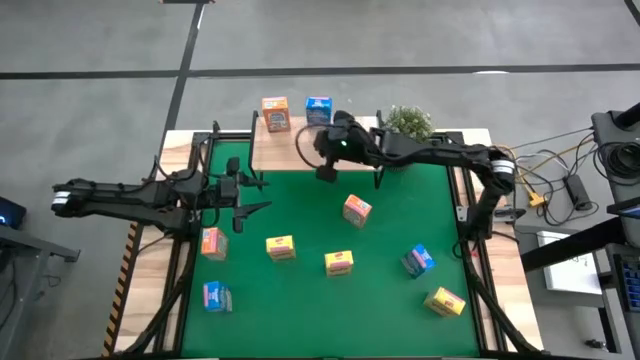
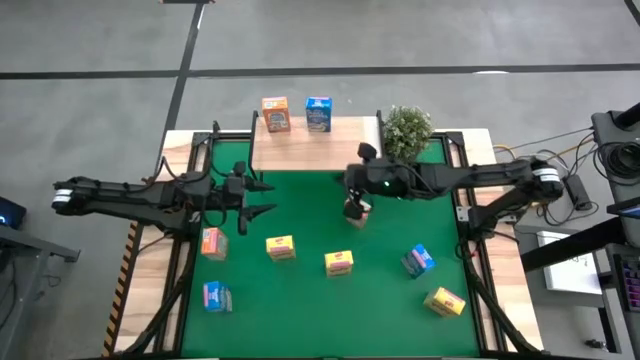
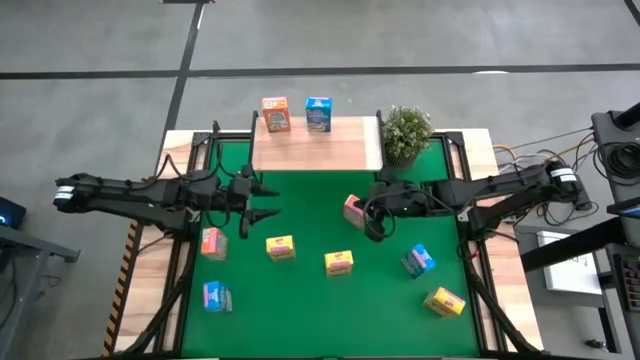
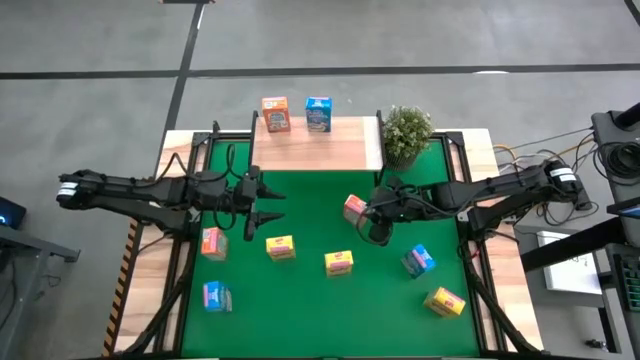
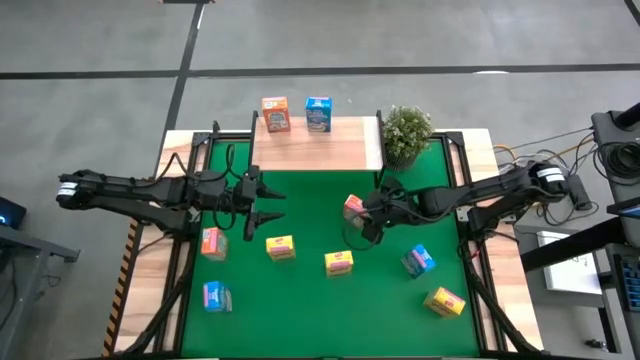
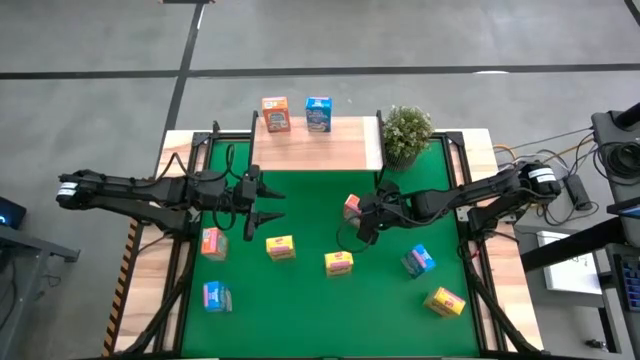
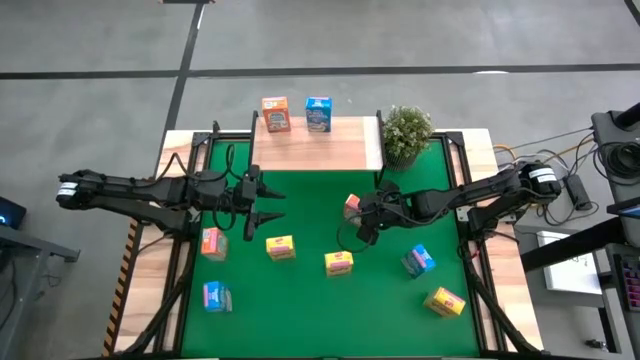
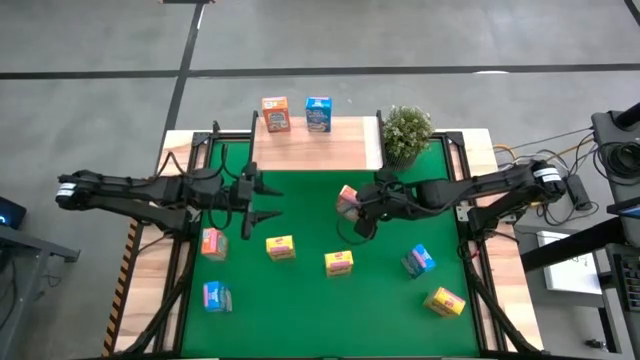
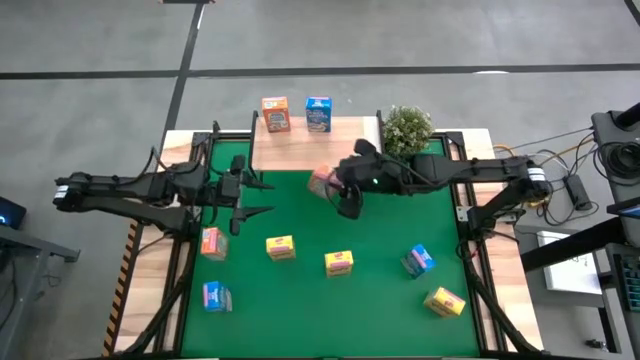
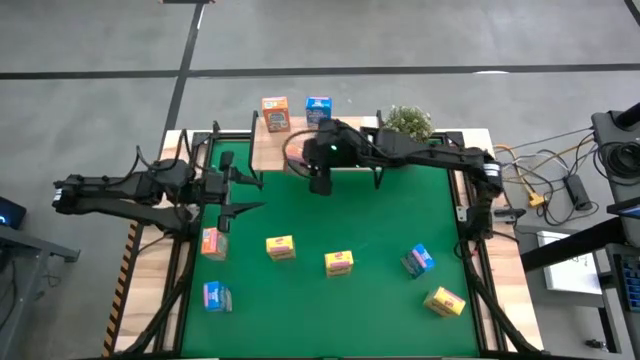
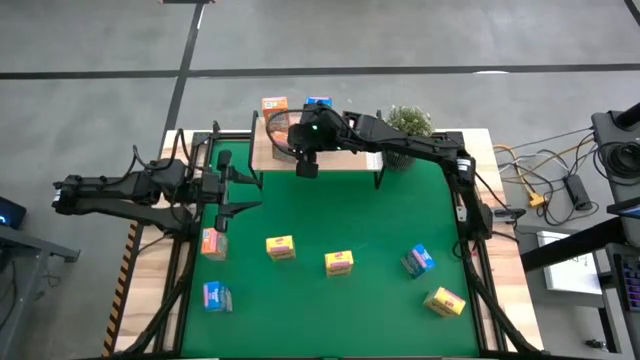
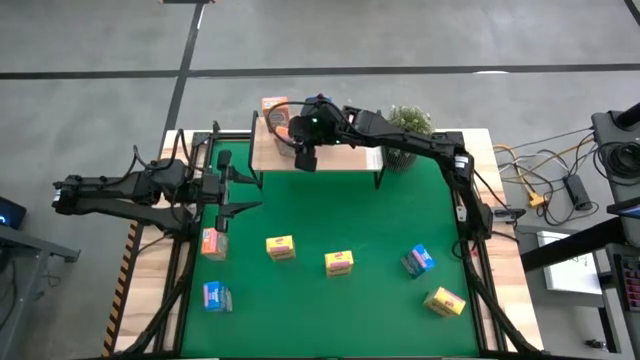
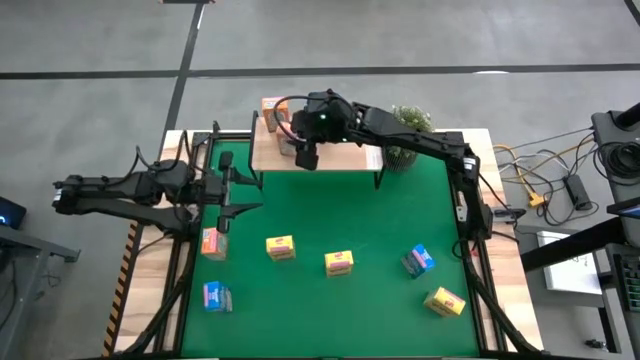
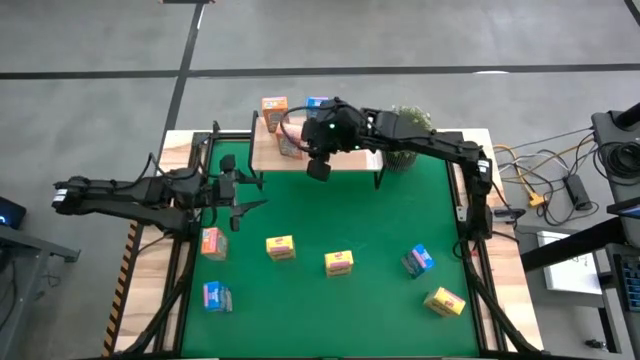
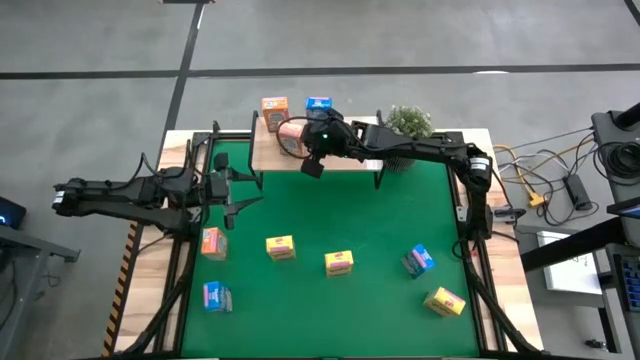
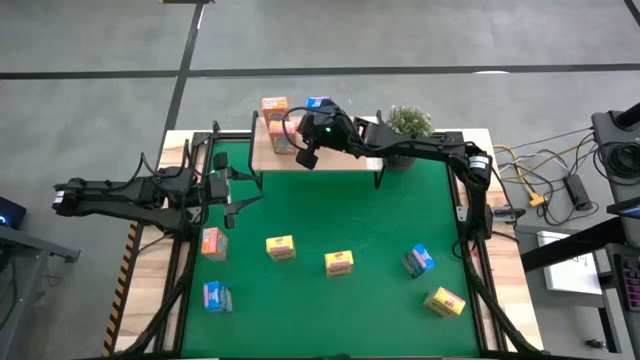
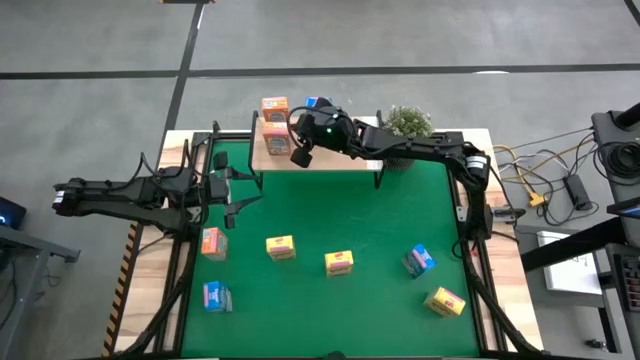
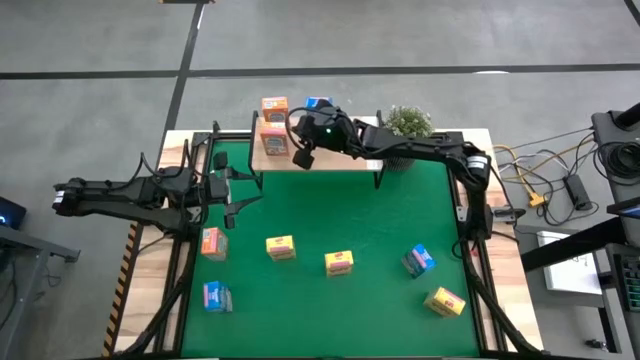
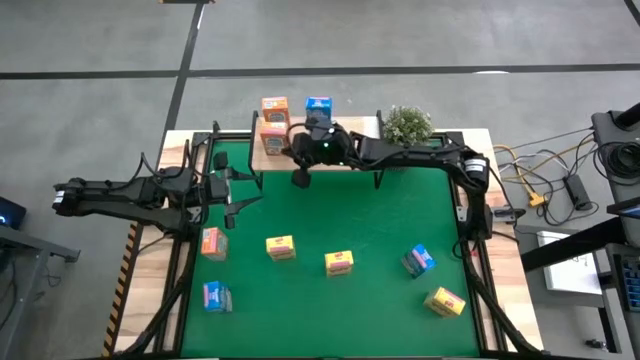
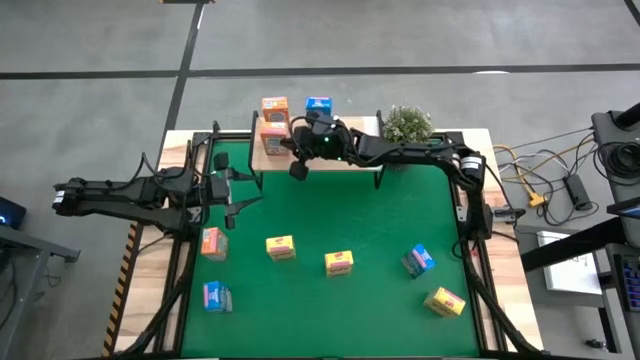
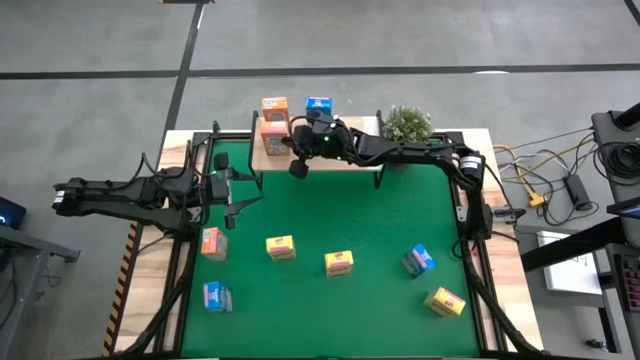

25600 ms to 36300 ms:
Task: Stack cereal on shelf
Put the right orange cereal box on the shelf

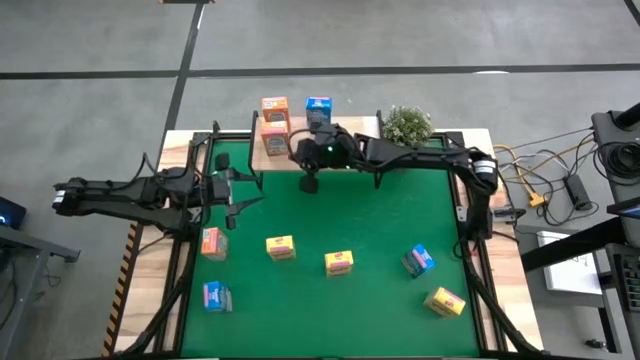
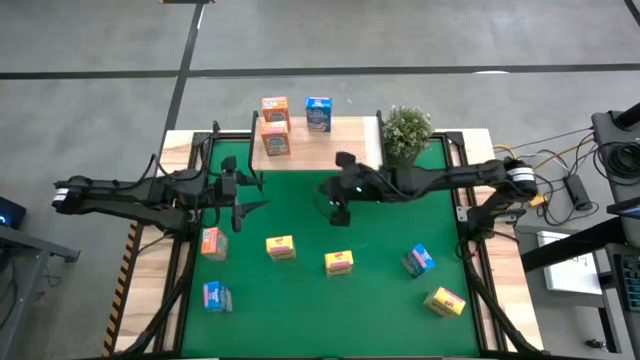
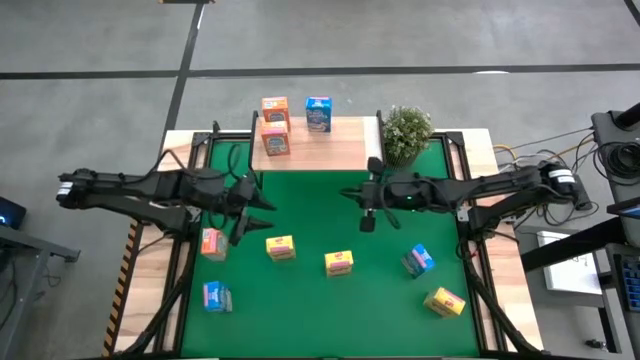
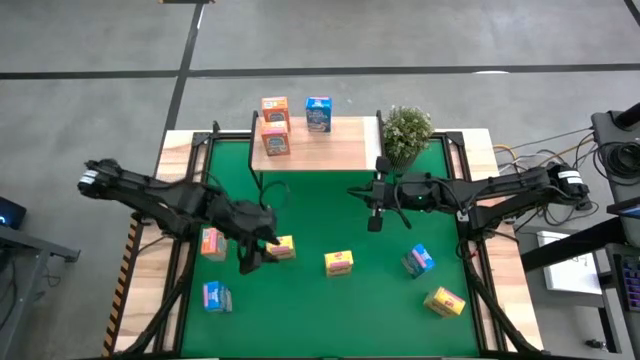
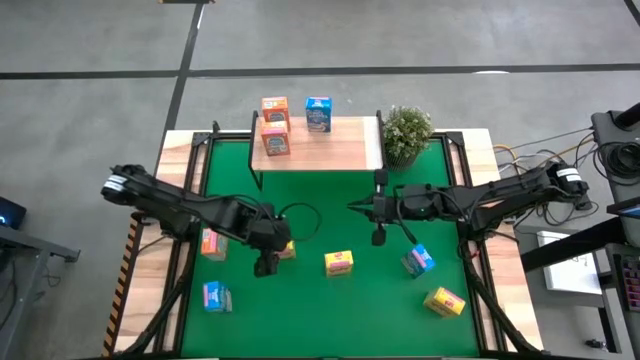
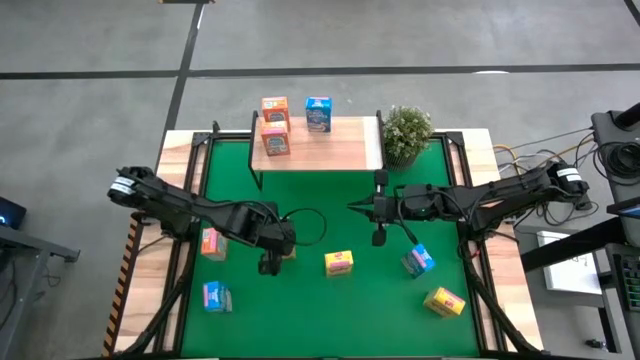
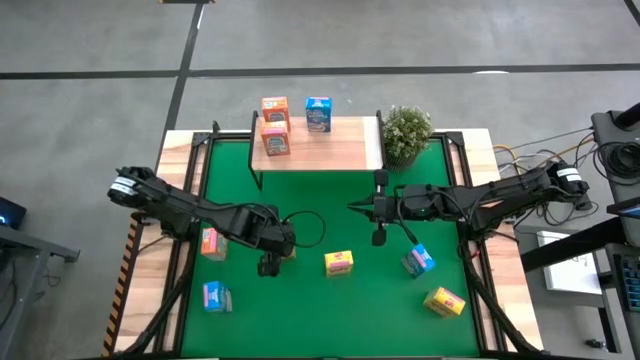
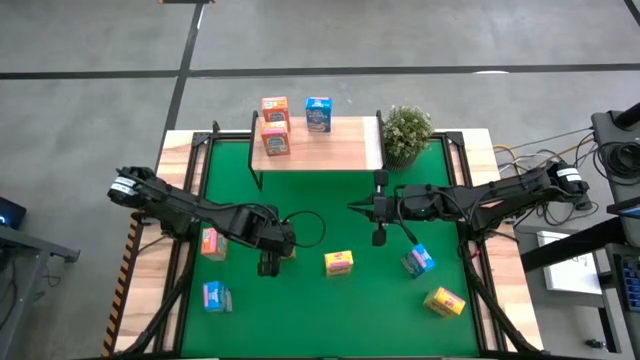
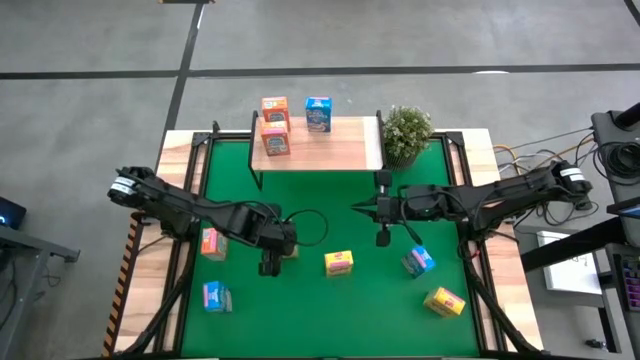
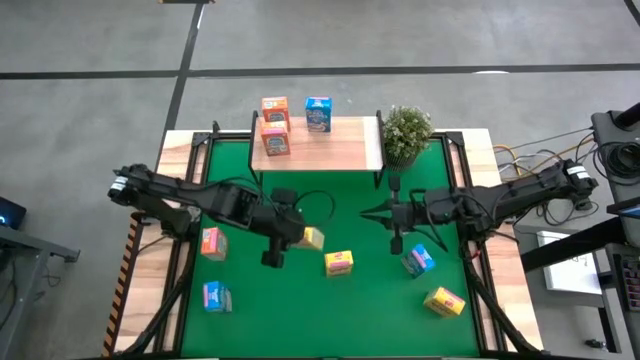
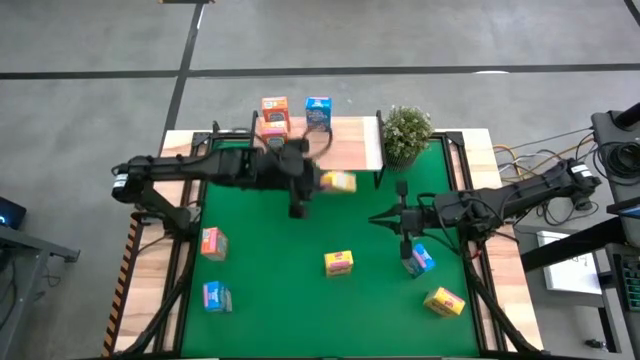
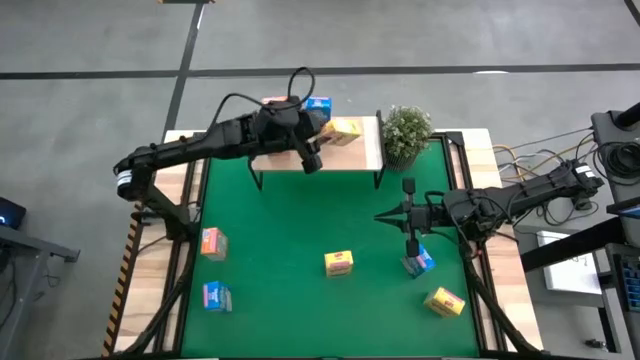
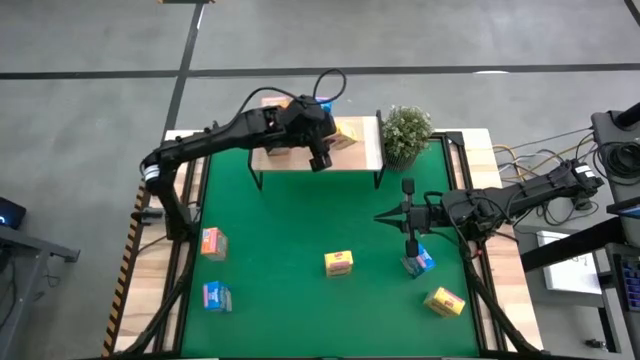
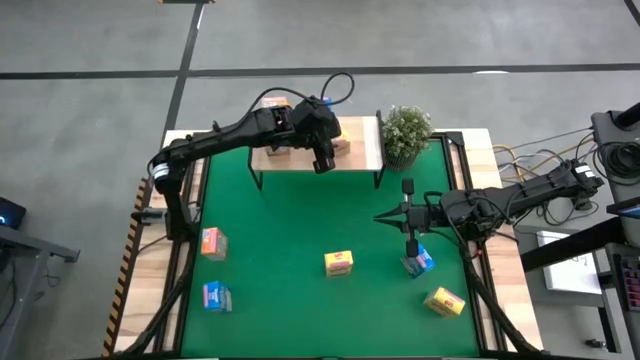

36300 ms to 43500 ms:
Put the top left yellow cereal box on the shelf

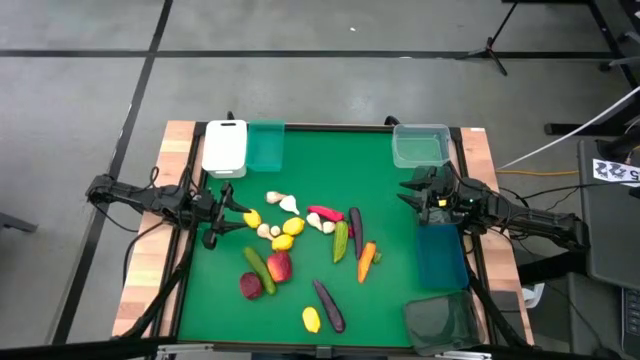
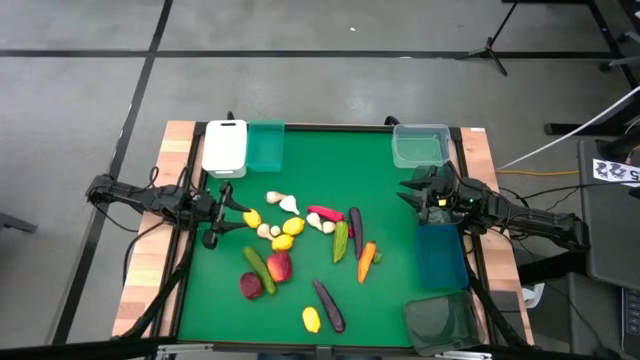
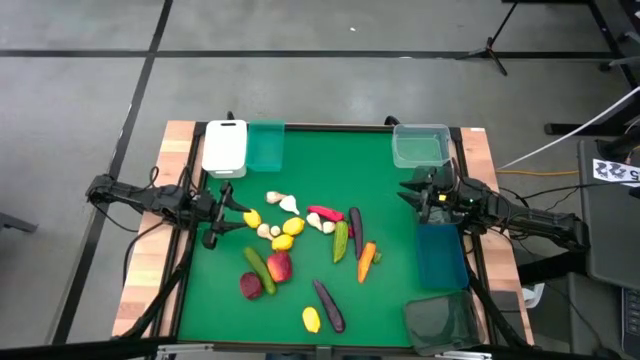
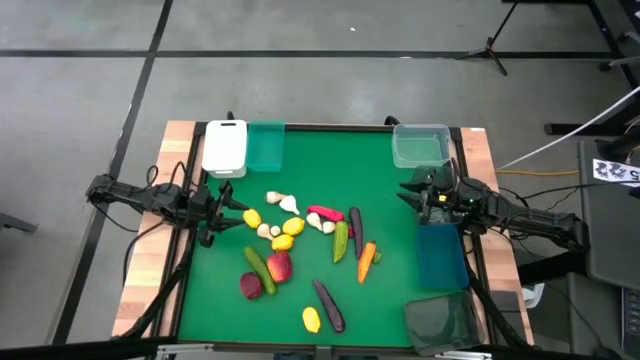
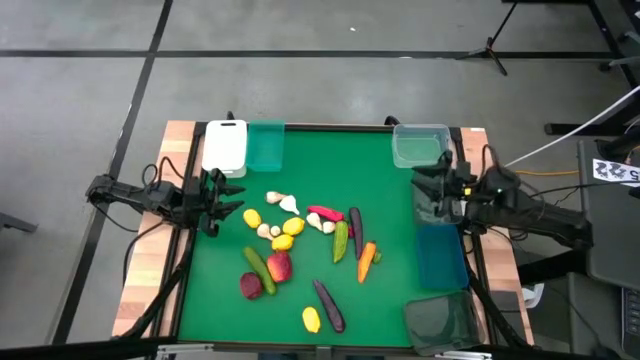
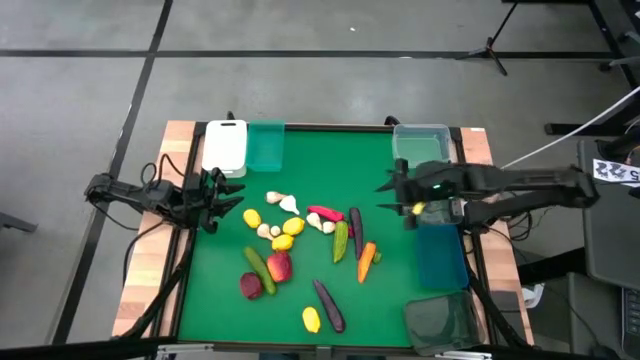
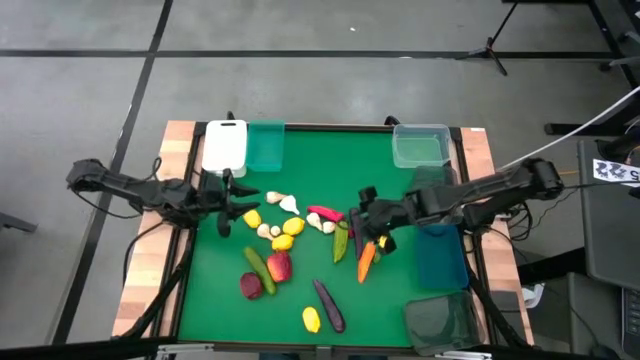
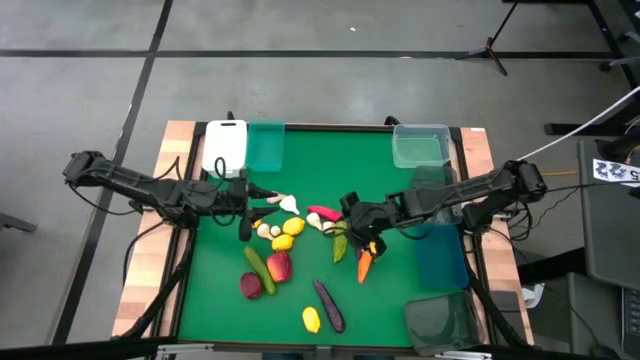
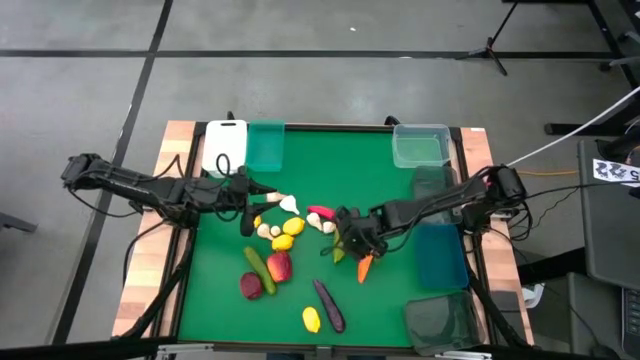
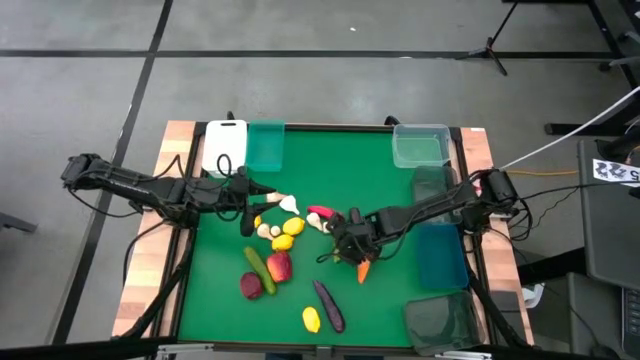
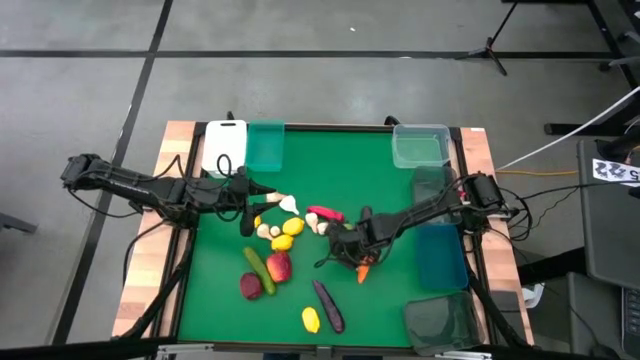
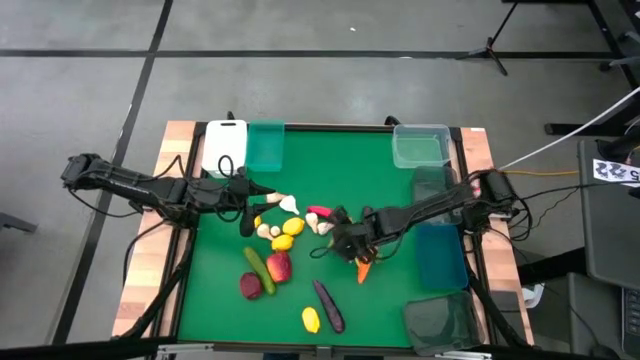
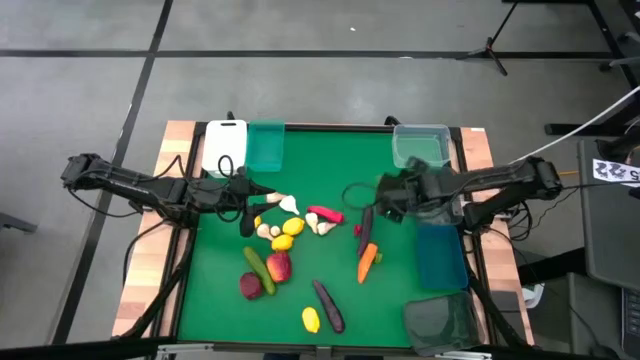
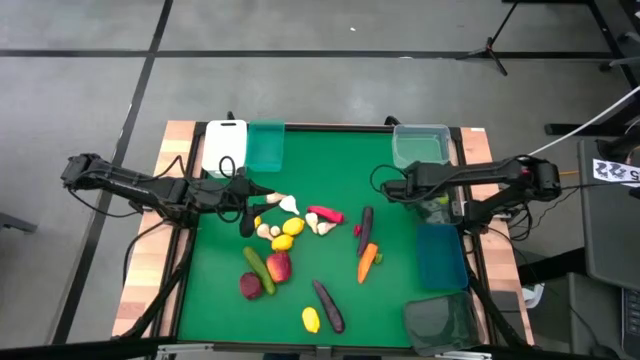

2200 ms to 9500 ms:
Task: Sort produce into baskets
Put the green cucumber into the top black transparent bin
